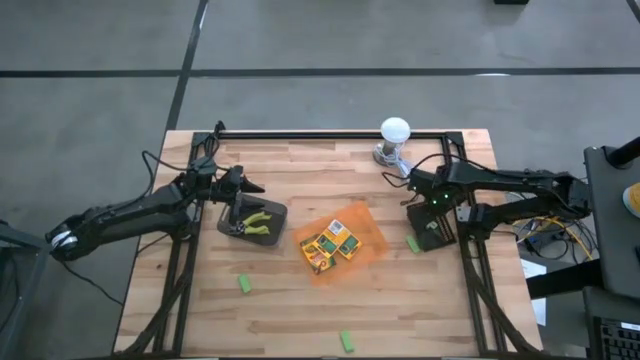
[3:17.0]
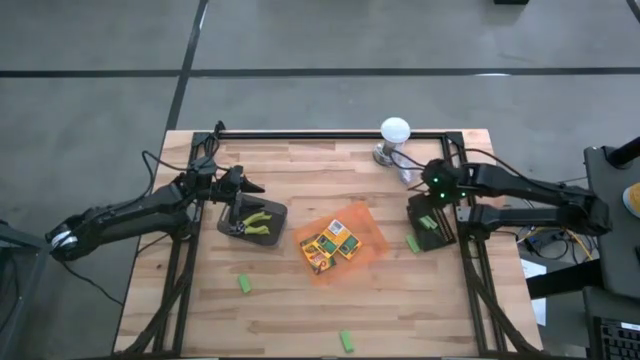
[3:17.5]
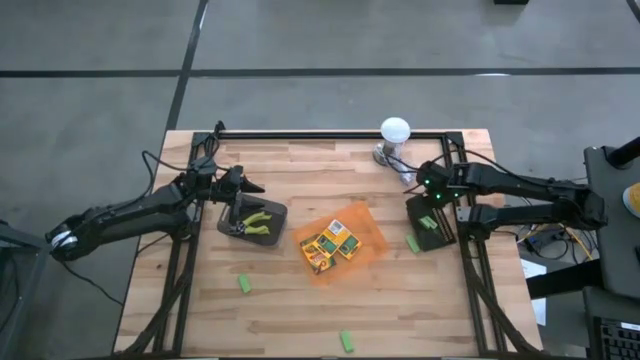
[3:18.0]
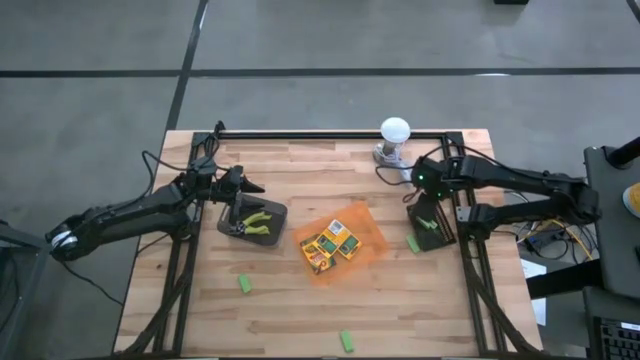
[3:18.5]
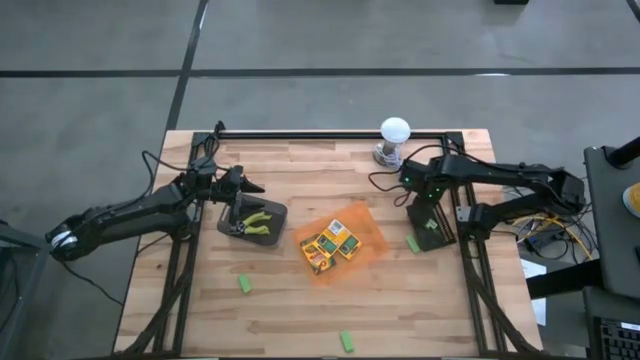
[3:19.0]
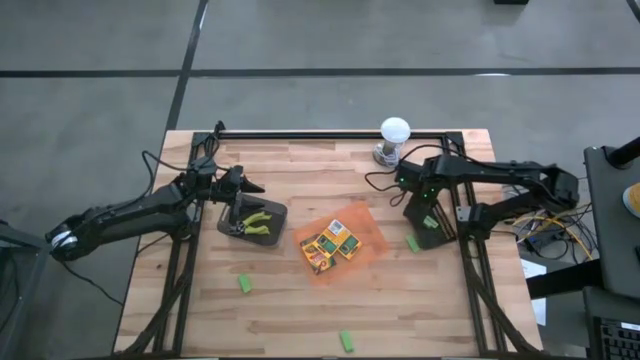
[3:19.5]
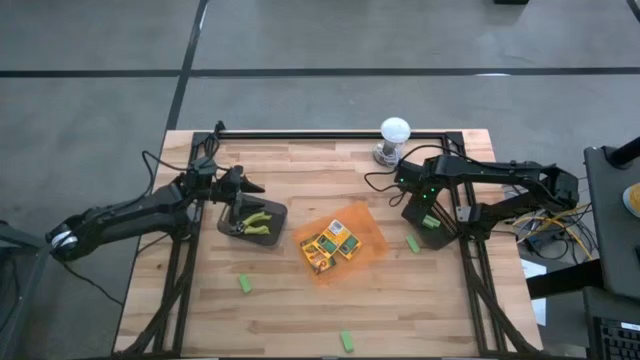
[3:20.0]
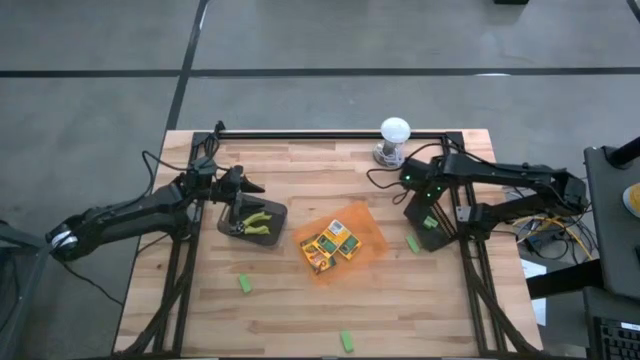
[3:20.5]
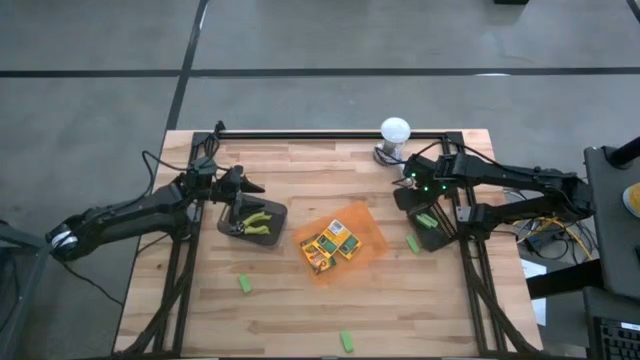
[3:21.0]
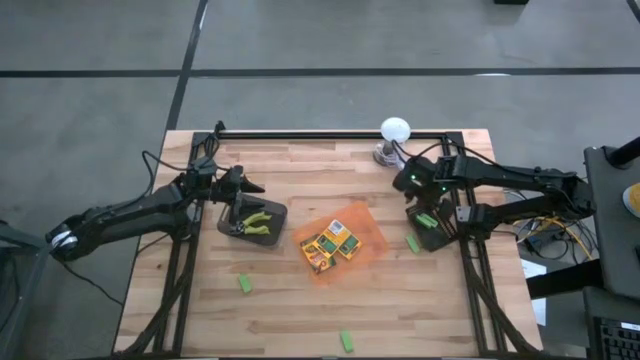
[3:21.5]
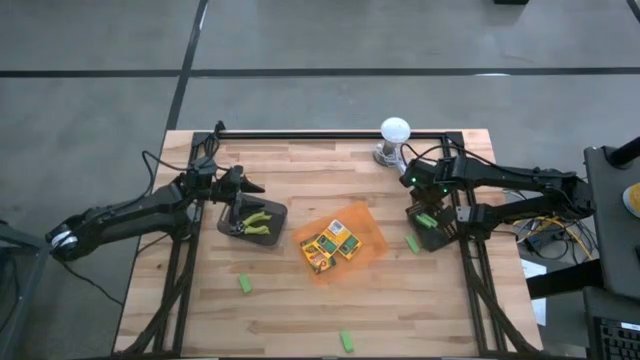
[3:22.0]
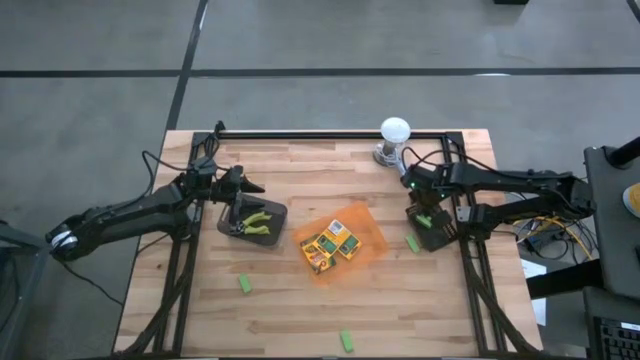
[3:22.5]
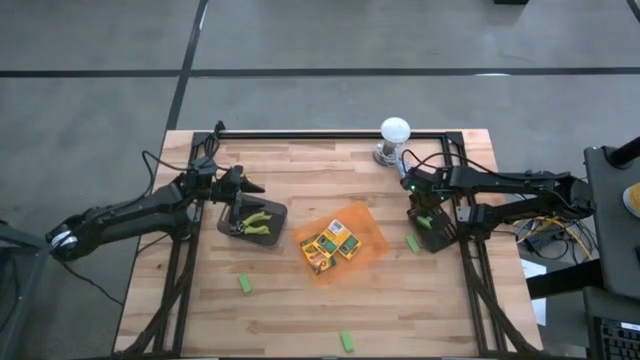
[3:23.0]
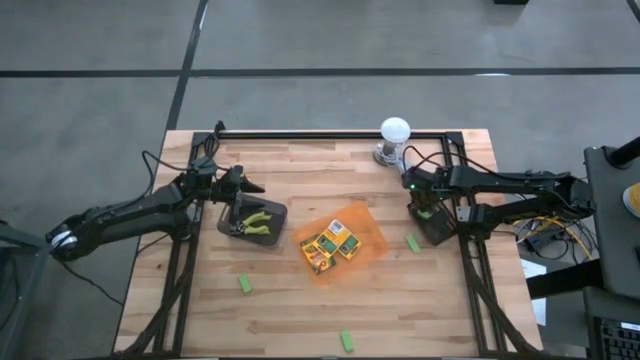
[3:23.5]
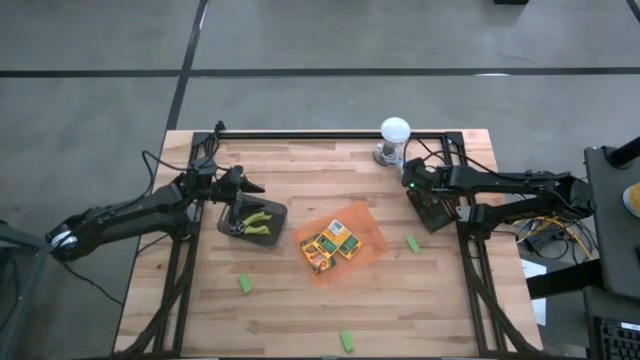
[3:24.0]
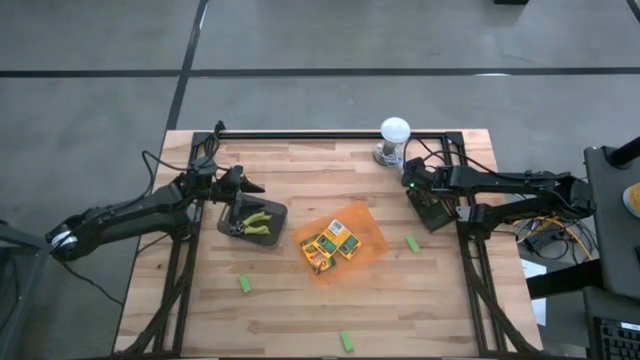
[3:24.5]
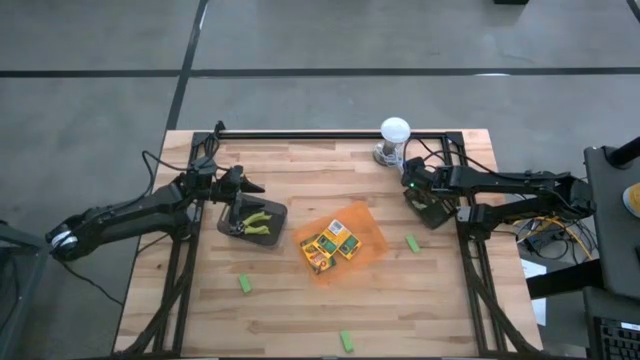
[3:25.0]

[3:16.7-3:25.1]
Task: Pick & Place School Supplies
Adjust the black basket

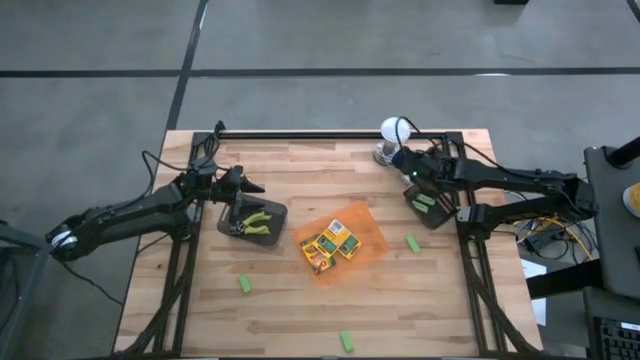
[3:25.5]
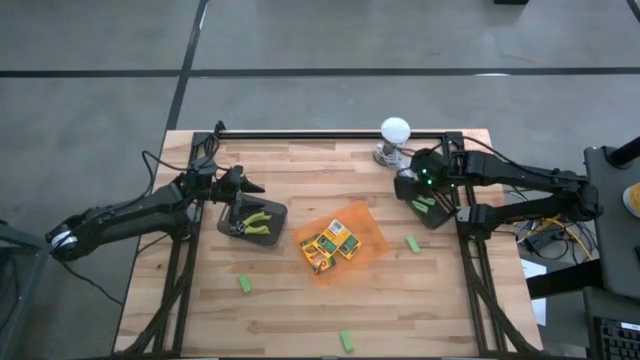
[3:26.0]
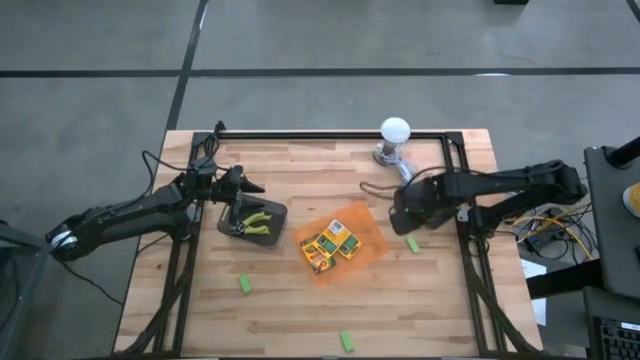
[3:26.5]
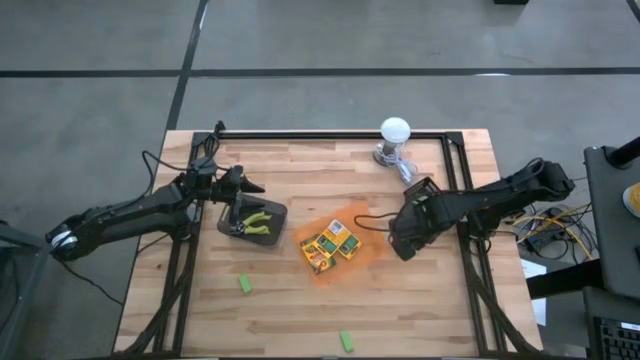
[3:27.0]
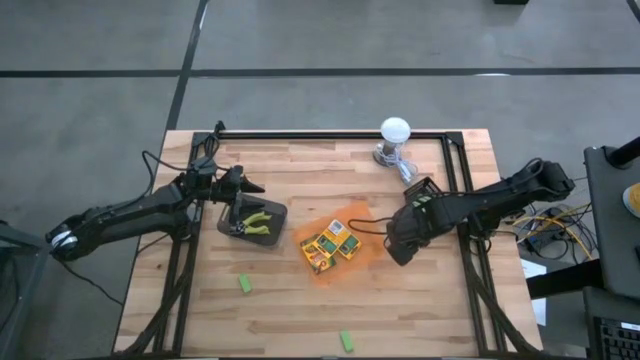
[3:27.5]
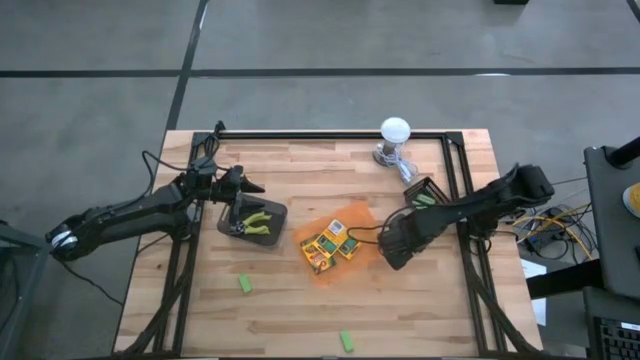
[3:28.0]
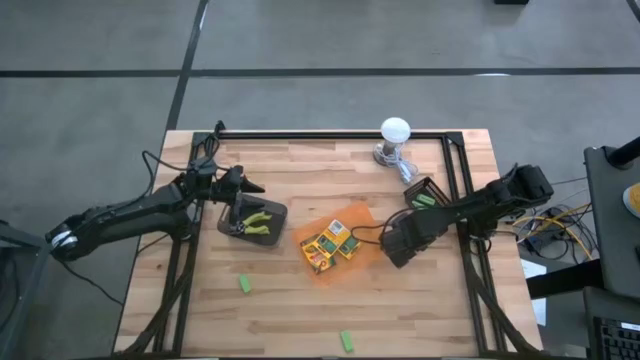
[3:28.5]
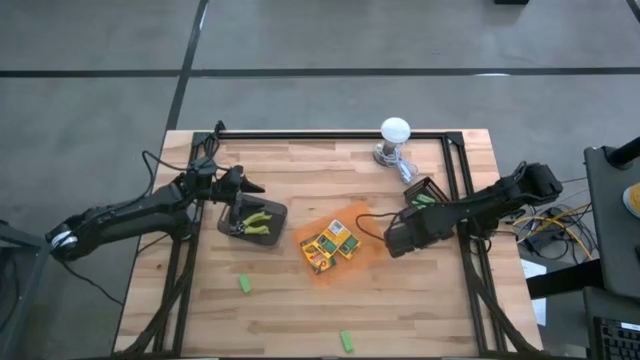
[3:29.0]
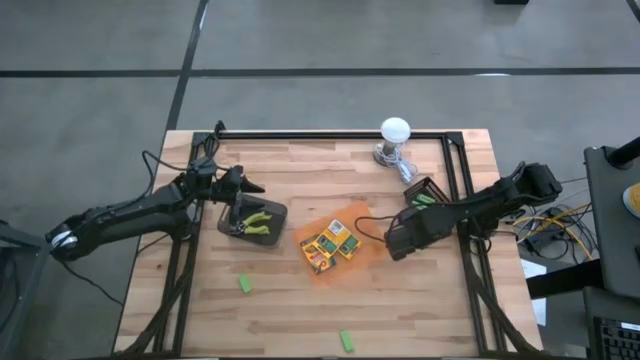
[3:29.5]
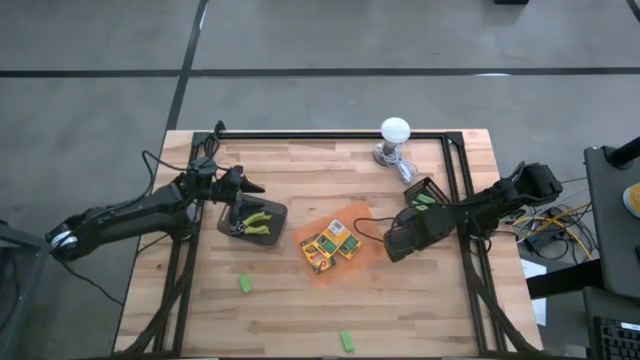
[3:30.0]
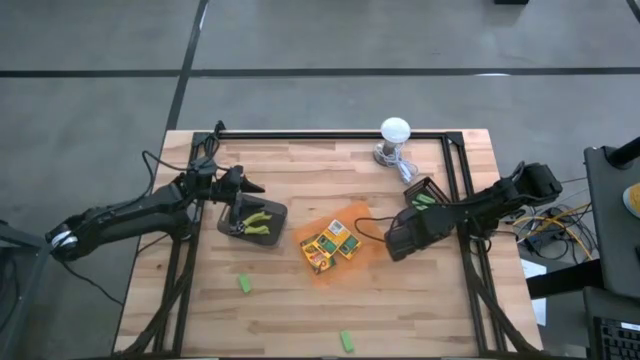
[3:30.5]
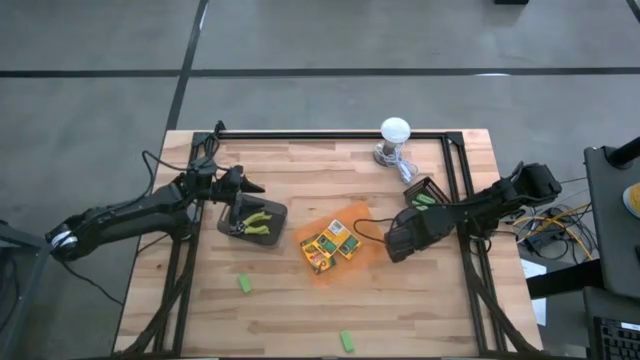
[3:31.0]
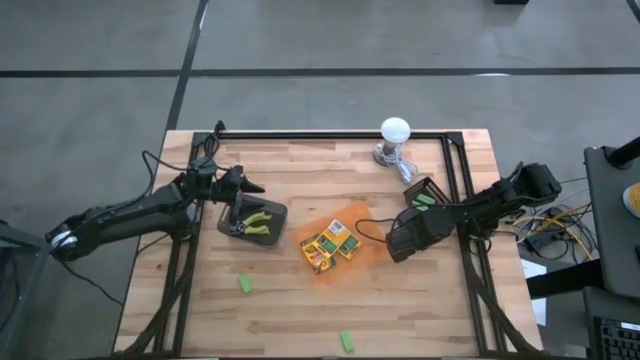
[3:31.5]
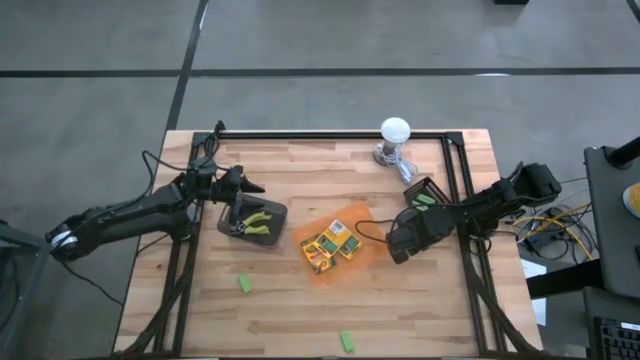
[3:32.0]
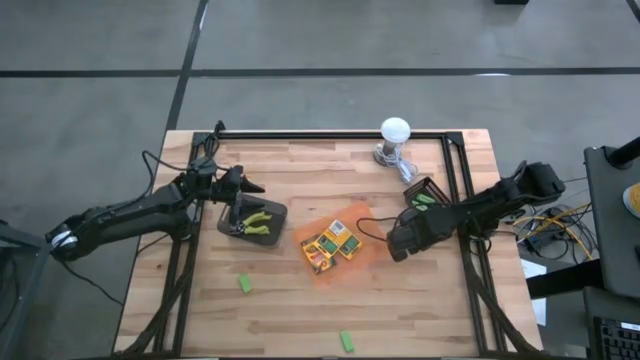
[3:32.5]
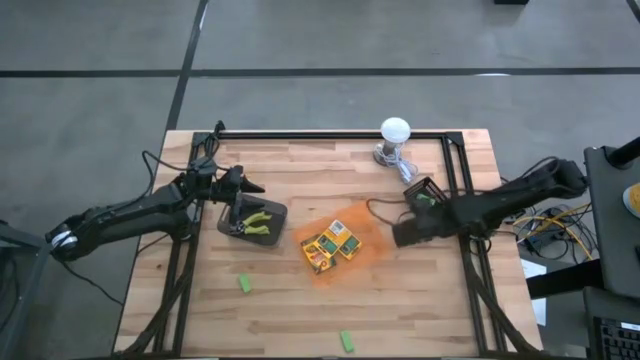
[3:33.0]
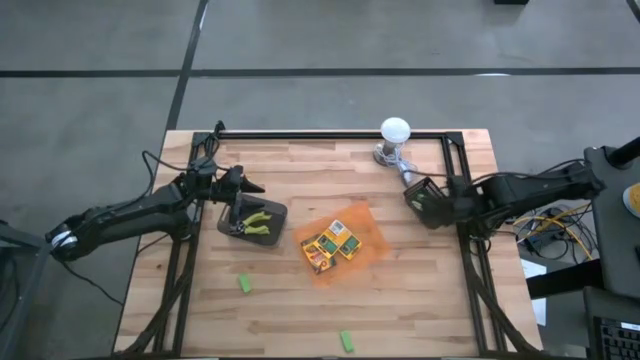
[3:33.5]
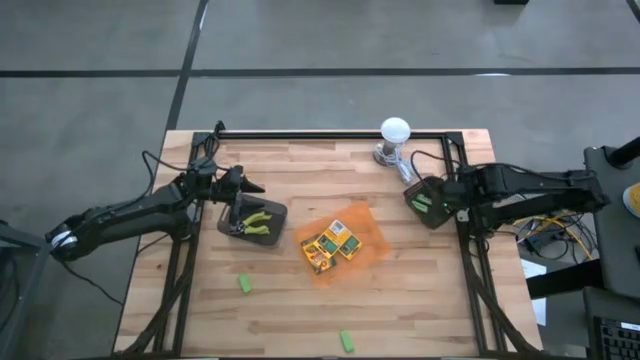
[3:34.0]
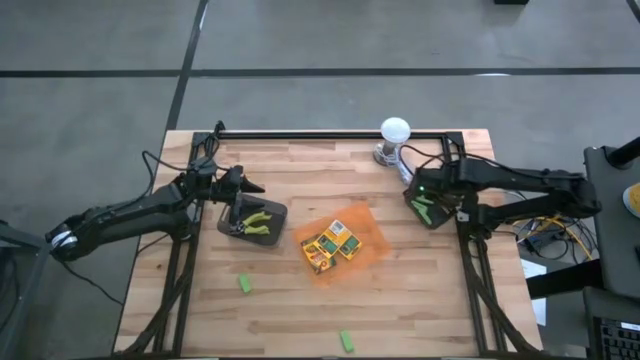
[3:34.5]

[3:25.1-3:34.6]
Put the right green eraser into the black basket

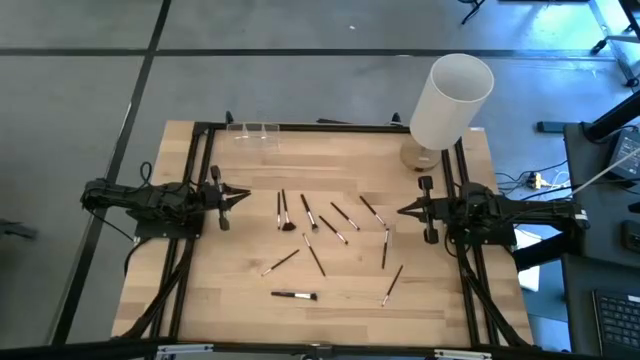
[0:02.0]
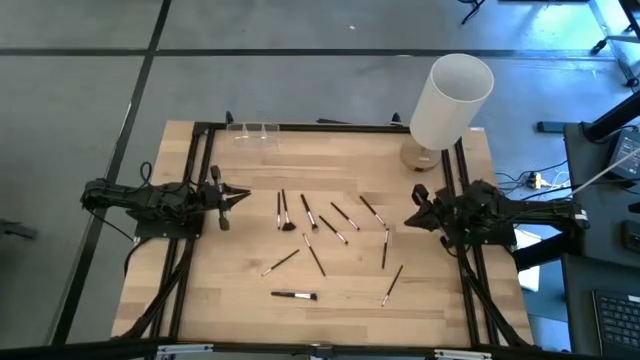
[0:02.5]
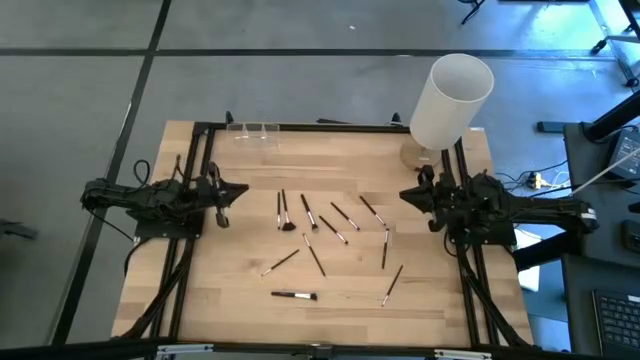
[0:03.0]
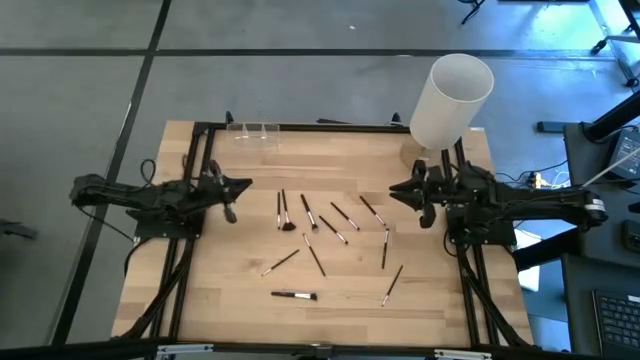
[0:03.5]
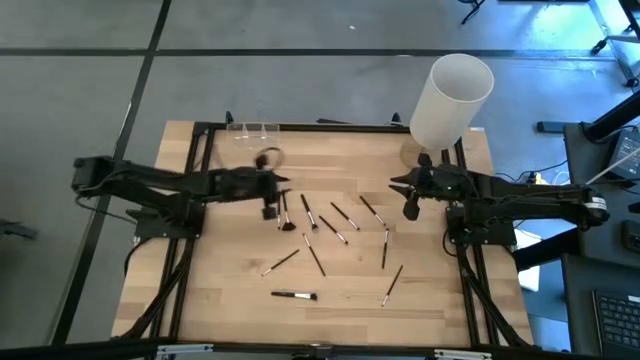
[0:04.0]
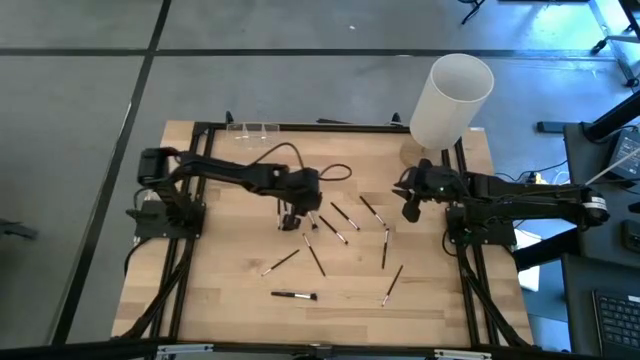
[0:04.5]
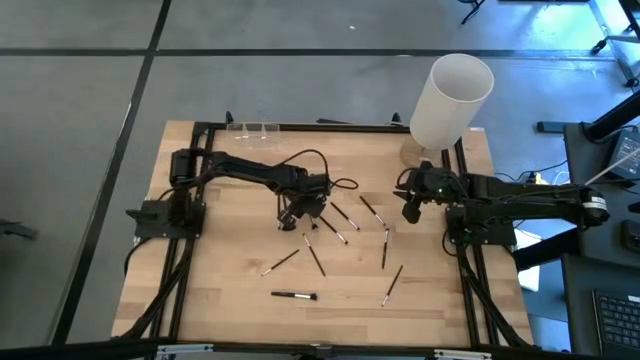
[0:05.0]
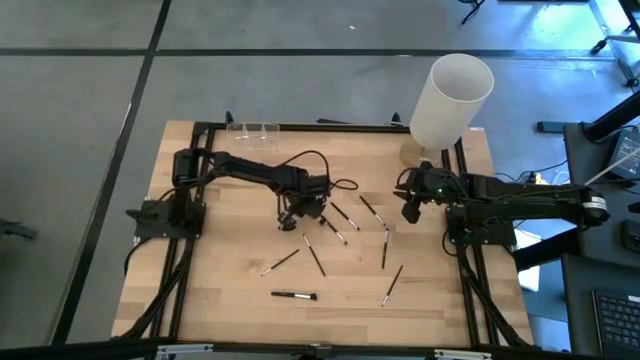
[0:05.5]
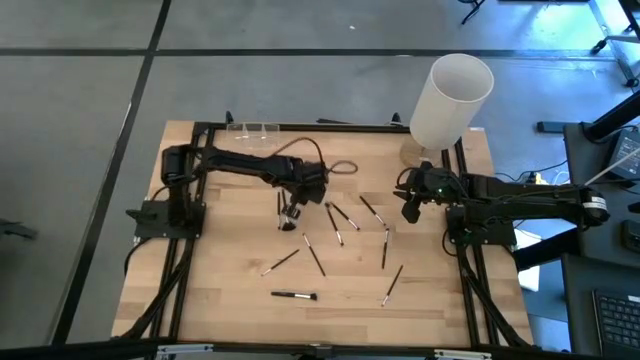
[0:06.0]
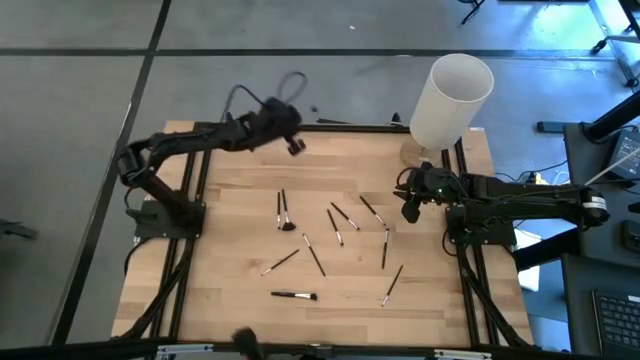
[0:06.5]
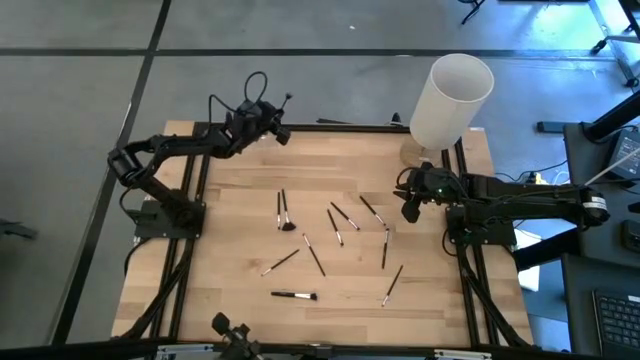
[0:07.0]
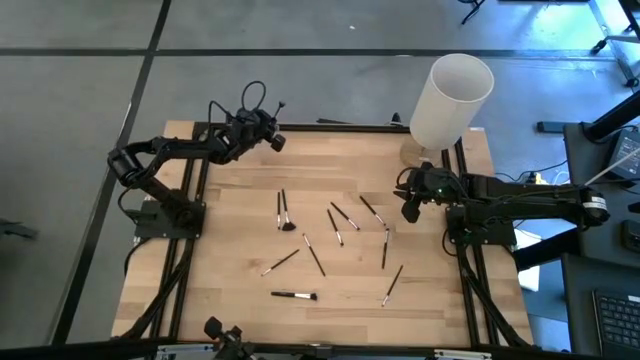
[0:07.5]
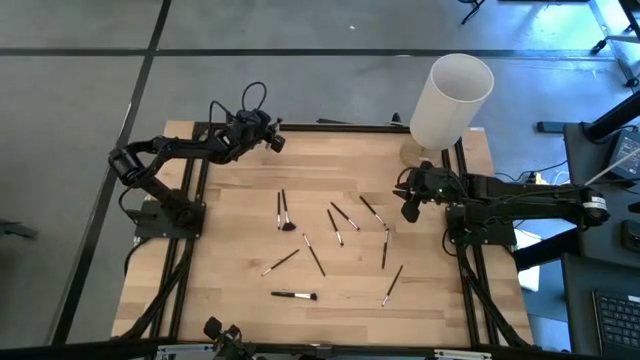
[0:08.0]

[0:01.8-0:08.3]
Task: Put items in baskets/containers
Put the black powder brush into the transparent organizer
